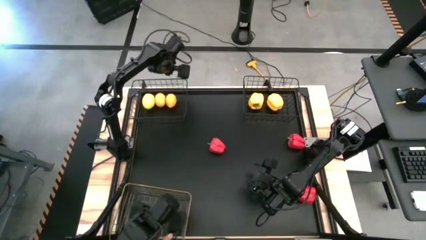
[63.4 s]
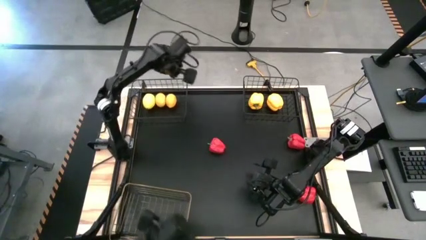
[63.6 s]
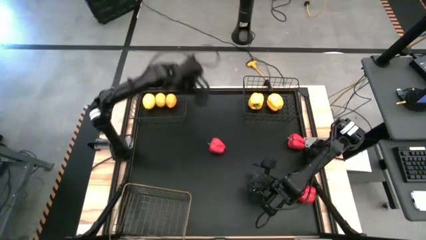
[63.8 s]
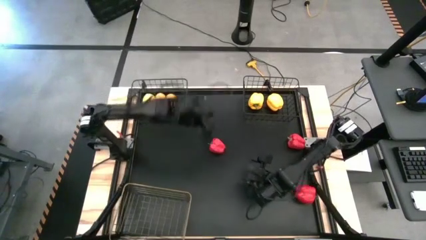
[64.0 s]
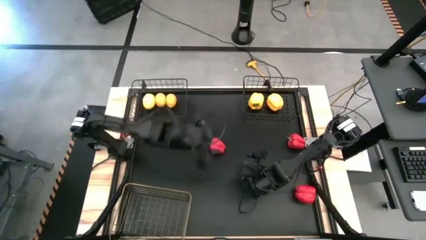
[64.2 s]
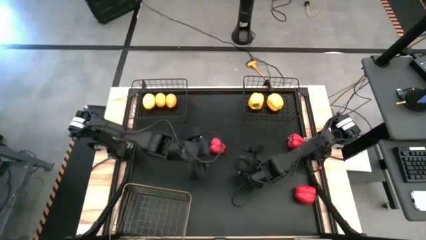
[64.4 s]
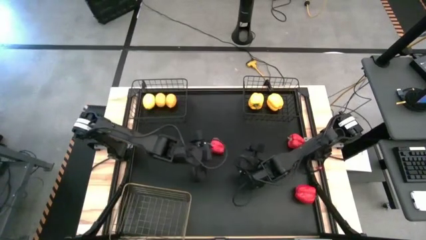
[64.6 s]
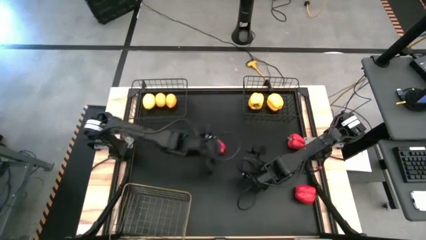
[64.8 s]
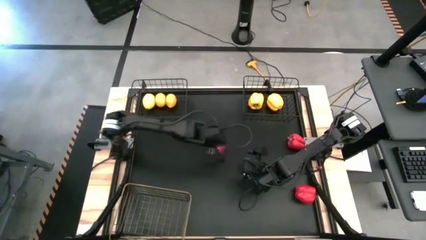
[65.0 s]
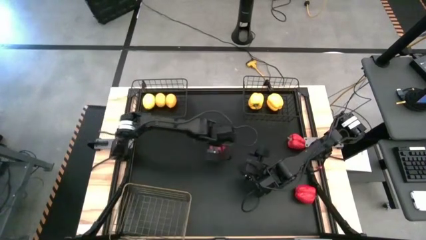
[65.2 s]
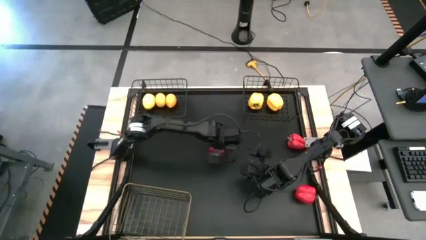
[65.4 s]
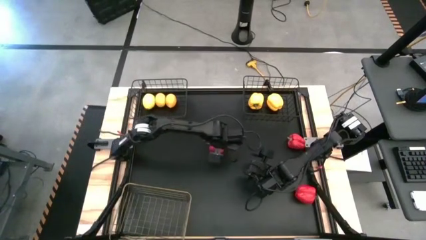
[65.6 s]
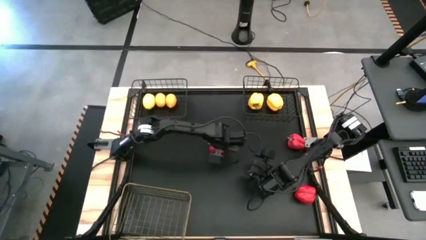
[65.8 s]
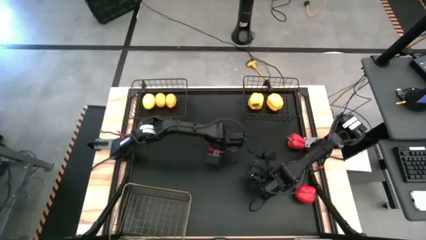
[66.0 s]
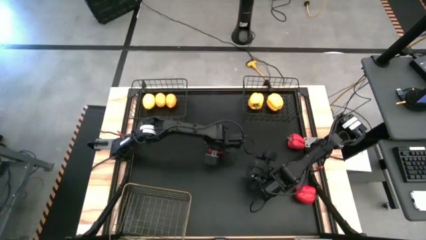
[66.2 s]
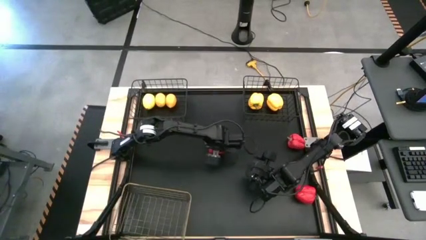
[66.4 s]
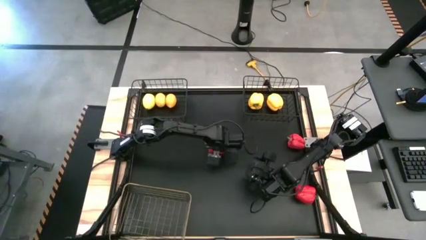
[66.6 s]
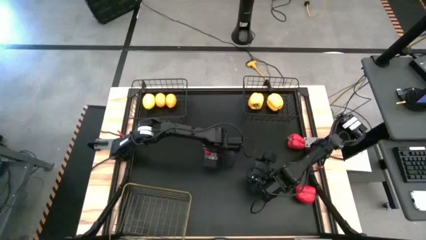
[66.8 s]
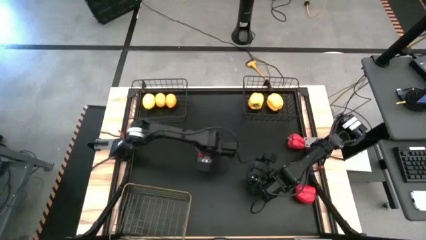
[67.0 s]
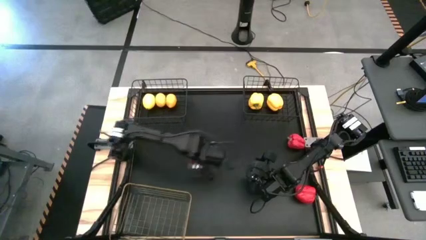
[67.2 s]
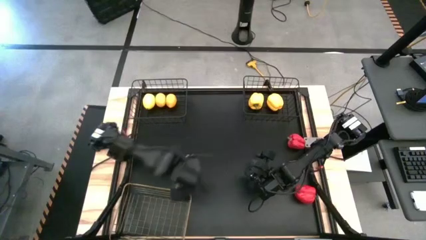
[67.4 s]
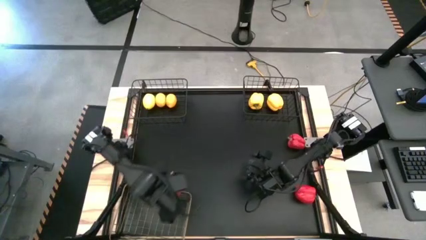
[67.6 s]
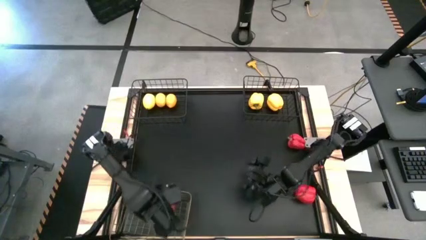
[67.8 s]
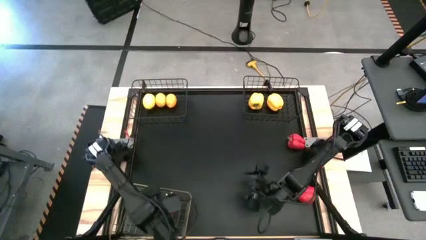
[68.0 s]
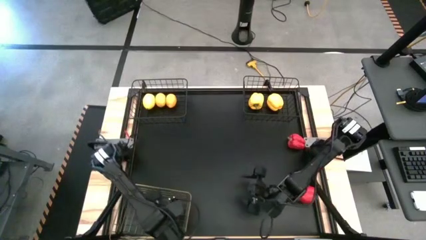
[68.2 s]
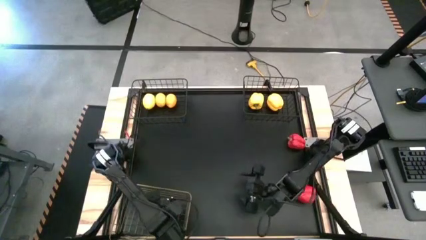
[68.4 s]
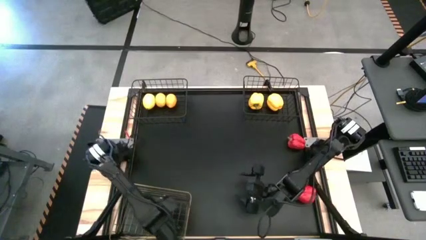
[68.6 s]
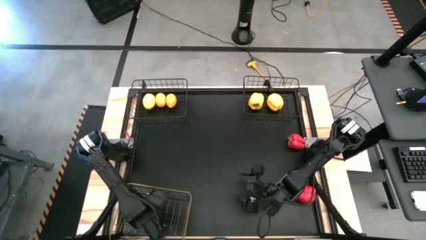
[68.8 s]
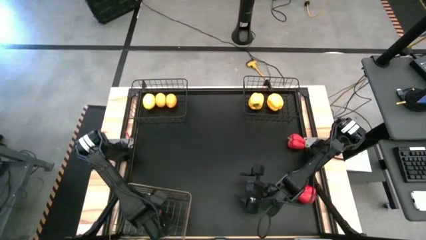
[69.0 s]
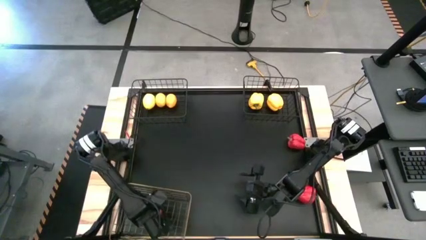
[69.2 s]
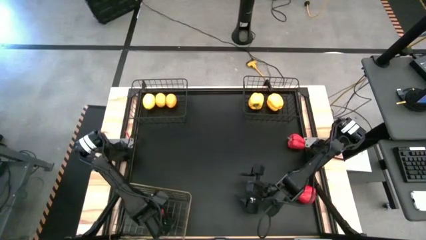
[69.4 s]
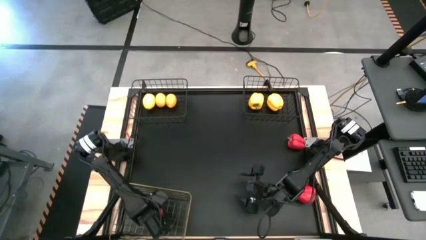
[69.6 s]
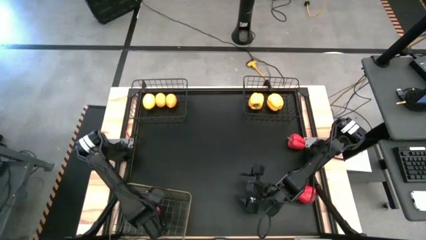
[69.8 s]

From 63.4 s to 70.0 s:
Task: Sort produce into baskets
Put the top left red bell pepper into the gold wire basket

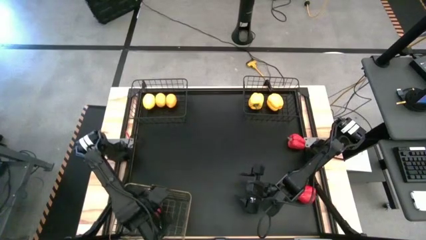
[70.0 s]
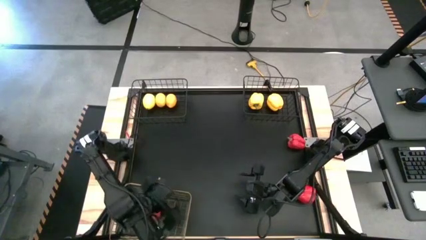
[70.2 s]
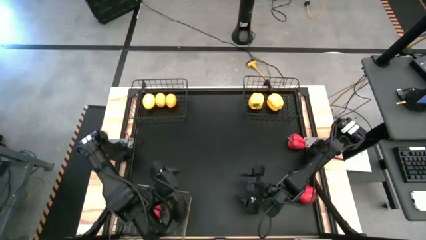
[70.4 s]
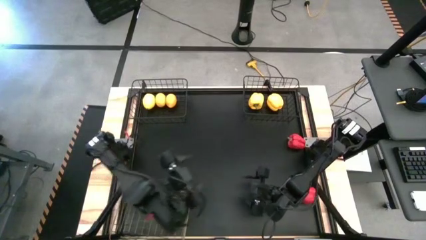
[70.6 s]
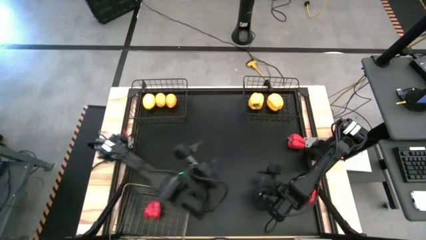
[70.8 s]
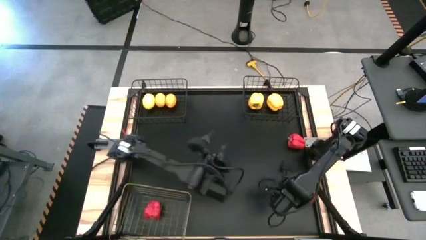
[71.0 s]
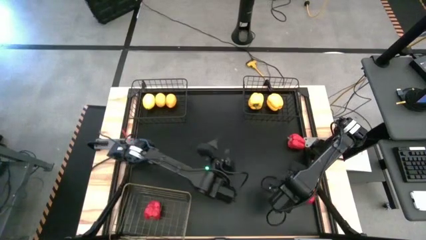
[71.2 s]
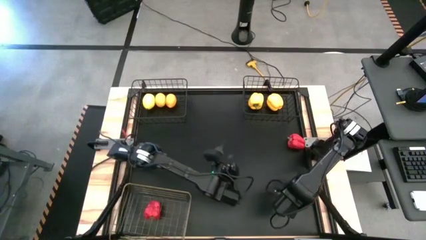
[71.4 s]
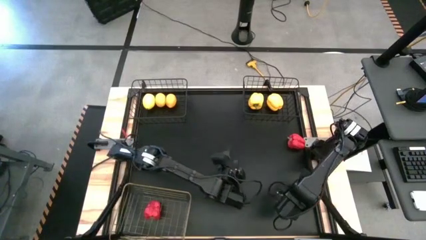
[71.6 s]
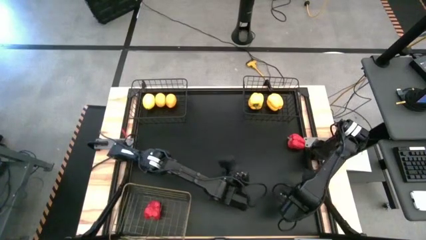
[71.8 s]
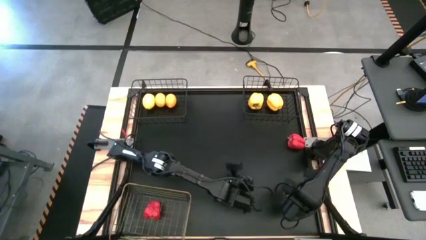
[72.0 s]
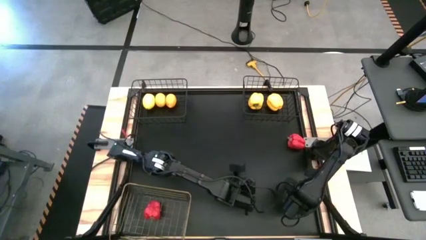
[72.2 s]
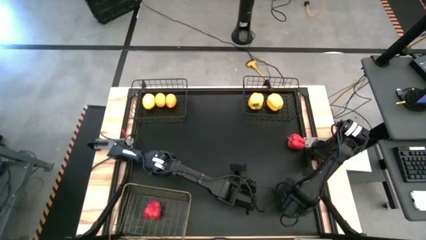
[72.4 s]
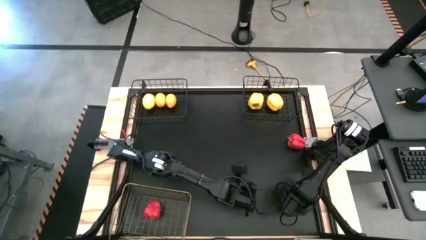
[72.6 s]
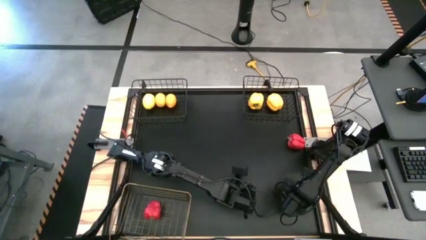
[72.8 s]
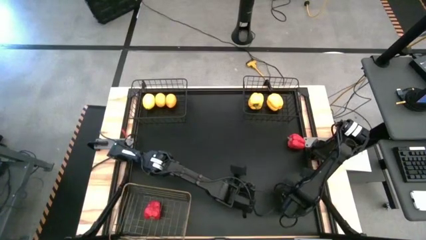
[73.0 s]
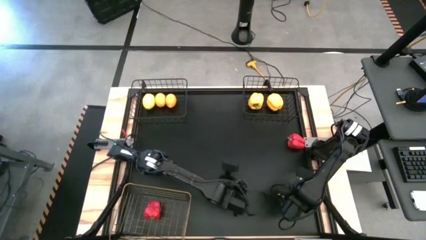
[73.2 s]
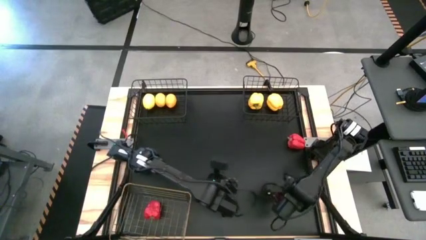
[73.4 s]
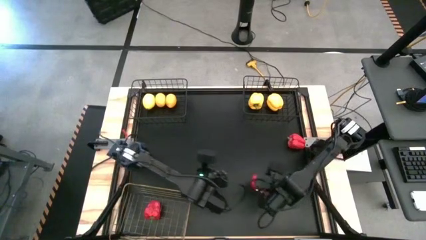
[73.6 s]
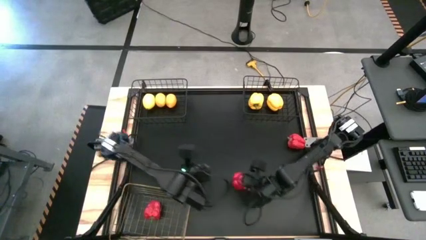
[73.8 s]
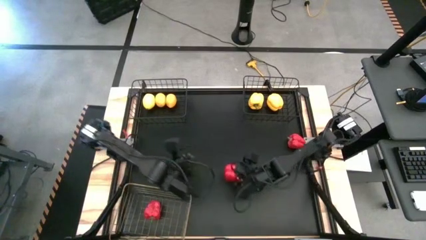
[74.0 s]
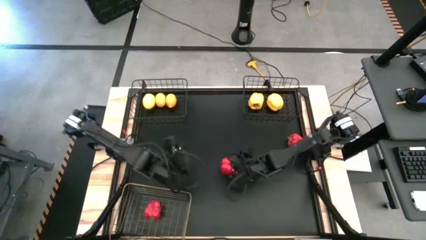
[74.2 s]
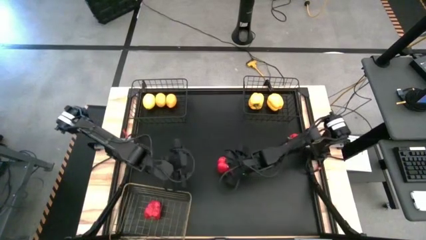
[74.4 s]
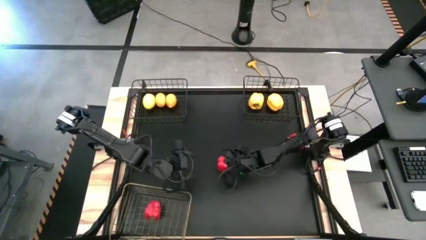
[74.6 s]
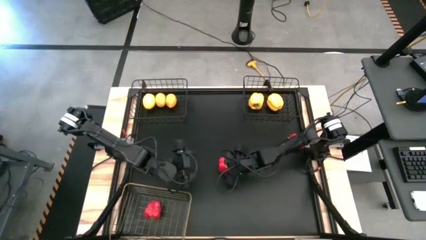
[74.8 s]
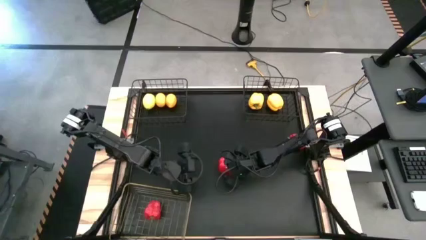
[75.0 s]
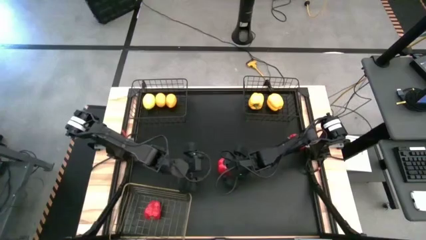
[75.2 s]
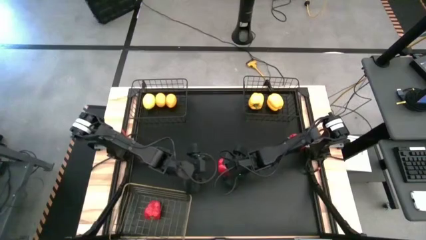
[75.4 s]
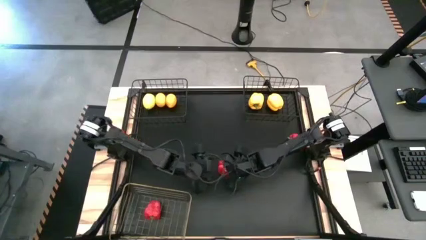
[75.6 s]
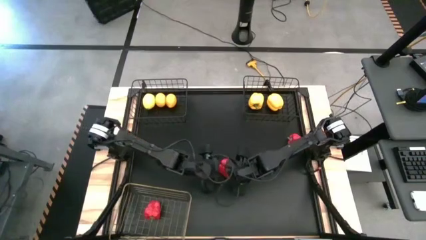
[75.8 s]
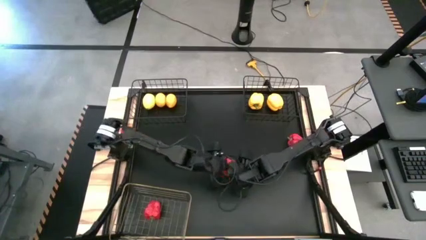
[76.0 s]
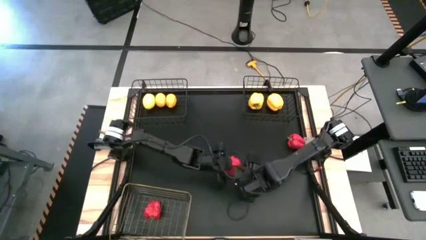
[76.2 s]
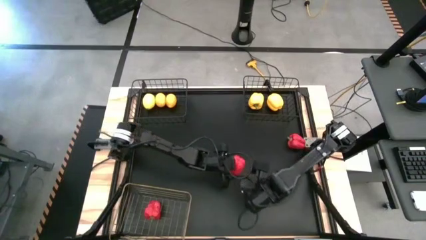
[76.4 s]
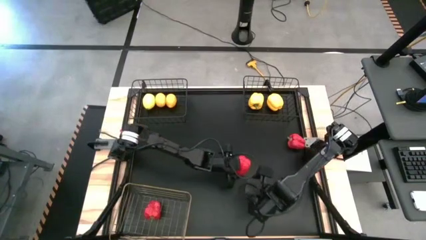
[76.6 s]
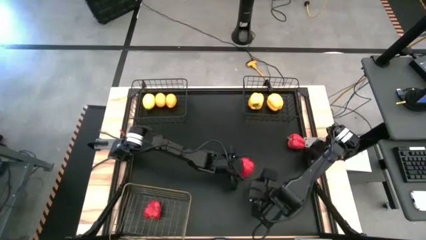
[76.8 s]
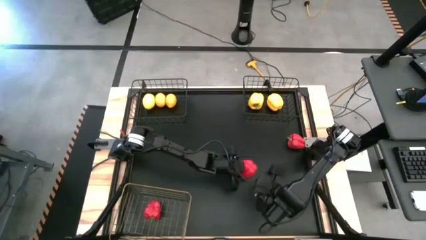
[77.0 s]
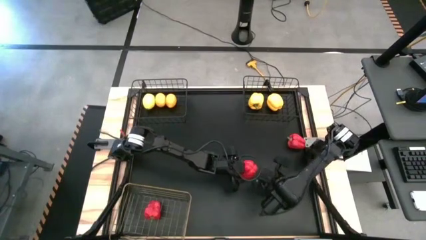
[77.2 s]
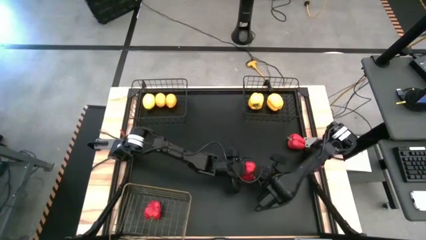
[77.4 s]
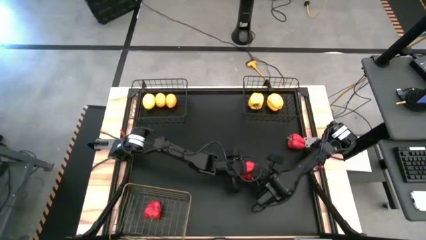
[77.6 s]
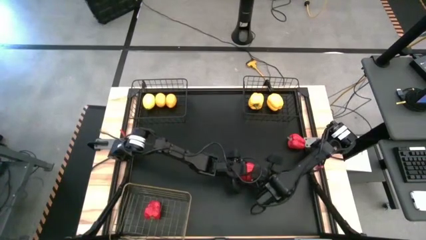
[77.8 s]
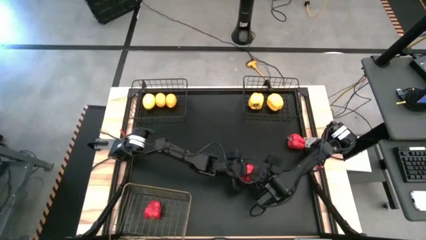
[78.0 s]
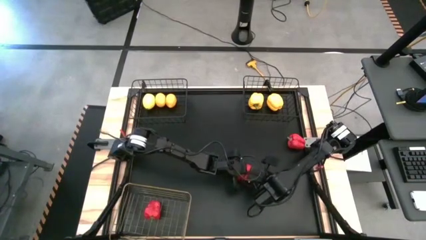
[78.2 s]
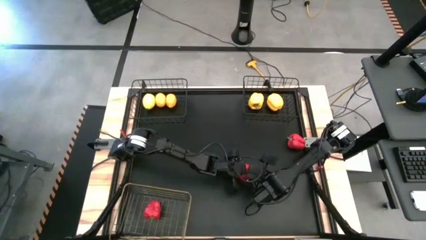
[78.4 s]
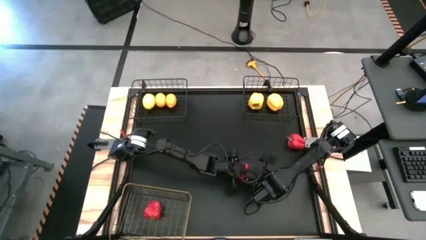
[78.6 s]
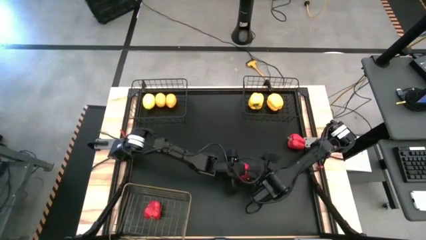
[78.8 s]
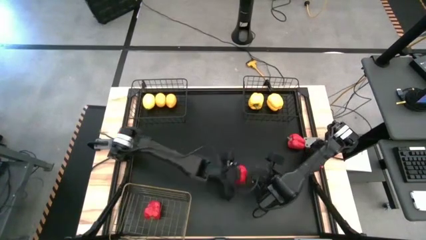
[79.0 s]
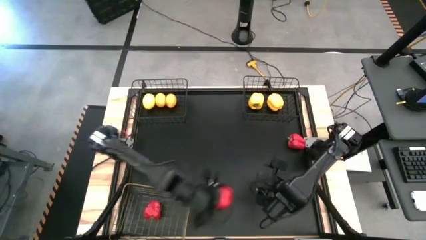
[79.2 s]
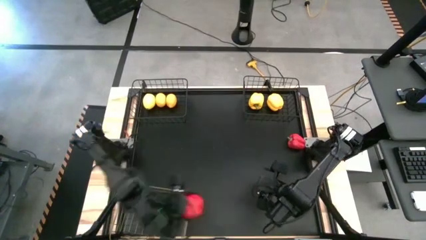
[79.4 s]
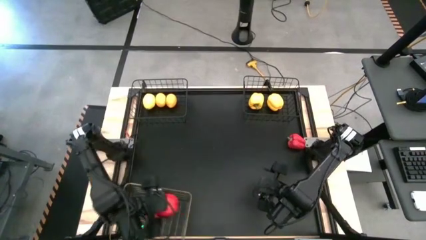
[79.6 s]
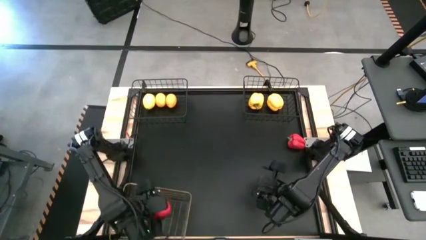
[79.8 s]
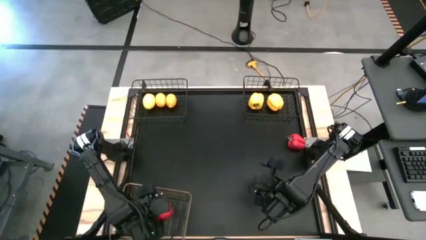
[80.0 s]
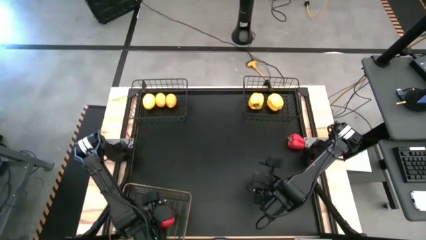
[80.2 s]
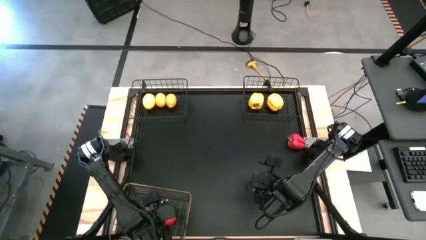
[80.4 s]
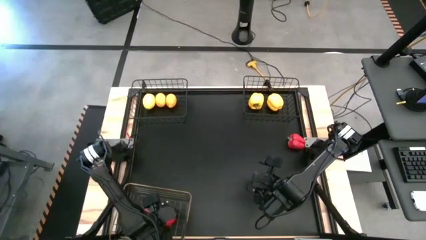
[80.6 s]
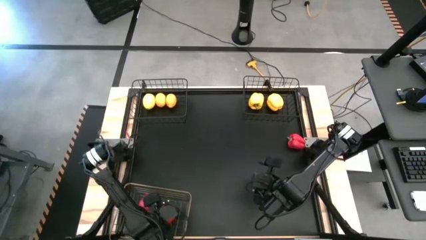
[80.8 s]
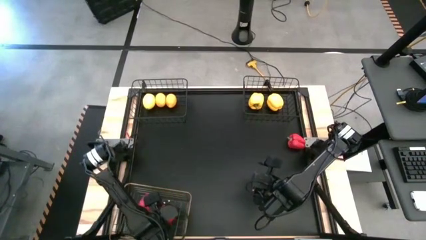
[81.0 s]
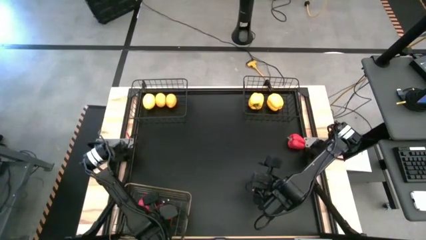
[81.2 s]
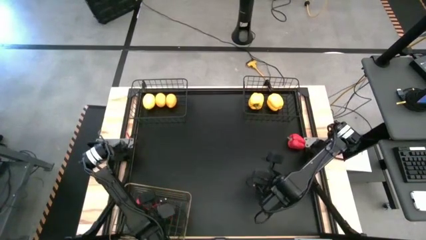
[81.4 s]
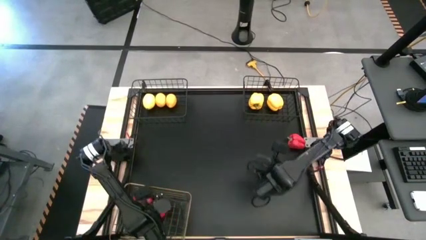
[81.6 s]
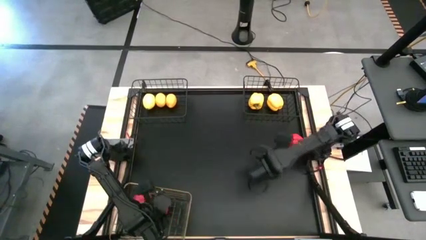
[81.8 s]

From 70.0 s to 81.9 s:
Put the bottom red bell pepper into the gold wire basket
